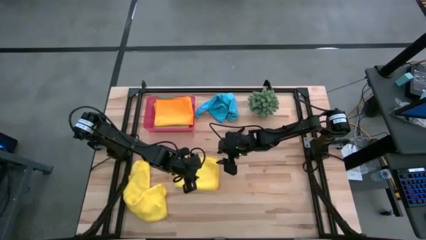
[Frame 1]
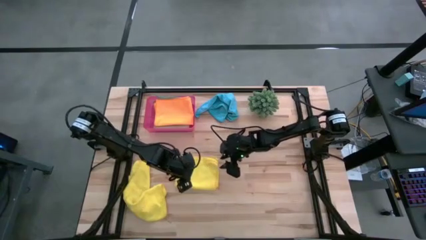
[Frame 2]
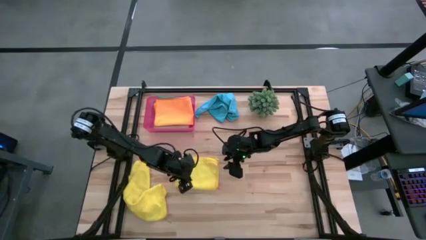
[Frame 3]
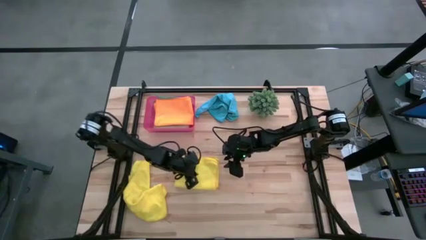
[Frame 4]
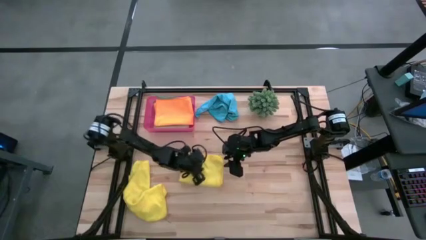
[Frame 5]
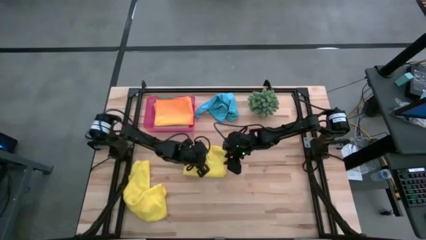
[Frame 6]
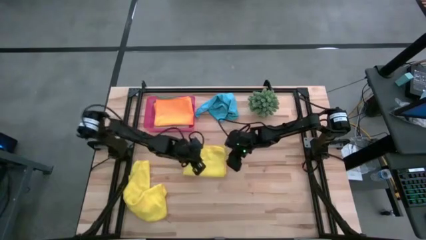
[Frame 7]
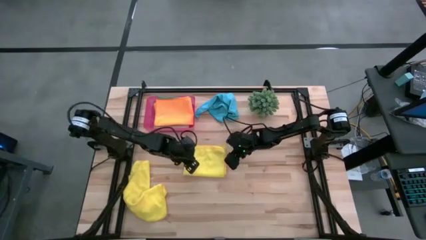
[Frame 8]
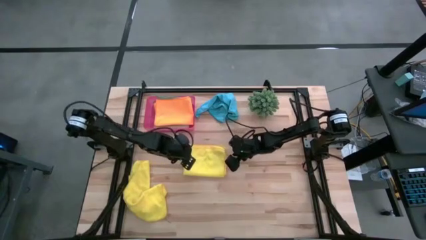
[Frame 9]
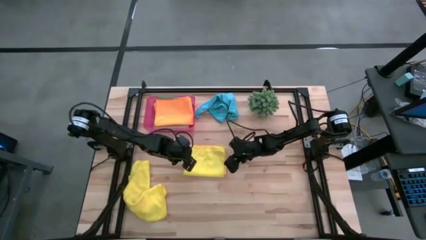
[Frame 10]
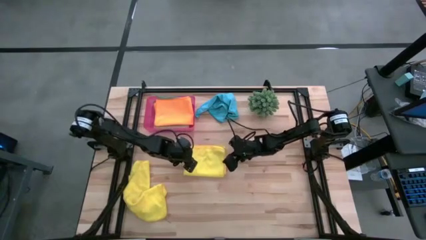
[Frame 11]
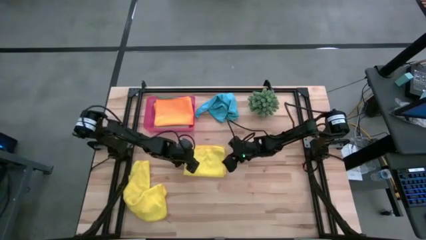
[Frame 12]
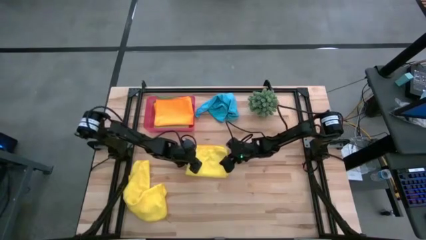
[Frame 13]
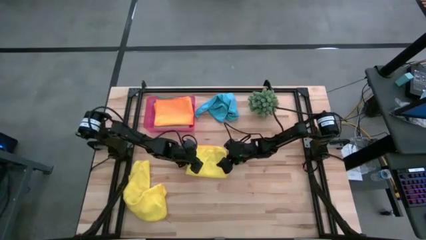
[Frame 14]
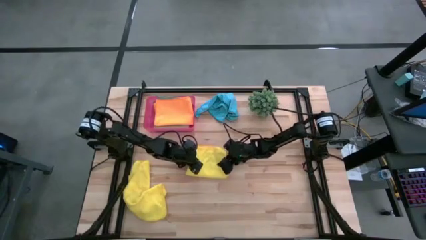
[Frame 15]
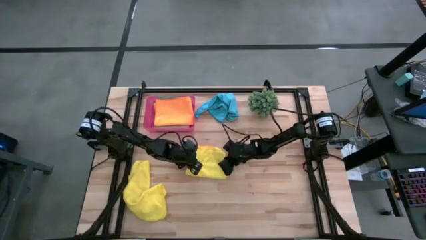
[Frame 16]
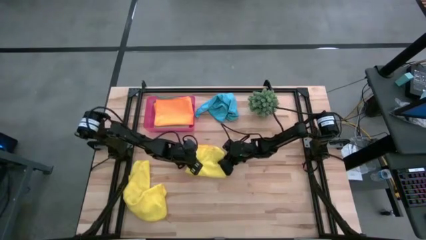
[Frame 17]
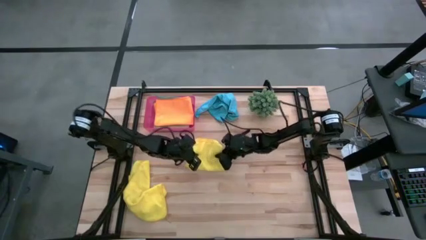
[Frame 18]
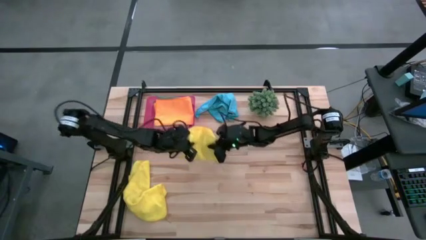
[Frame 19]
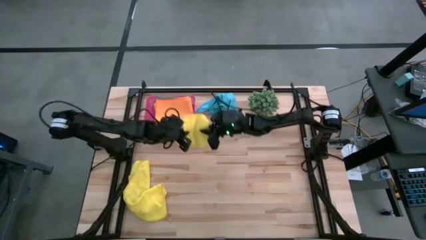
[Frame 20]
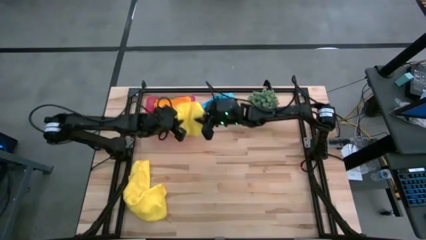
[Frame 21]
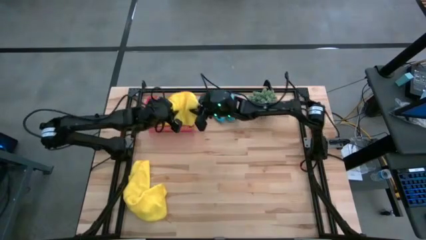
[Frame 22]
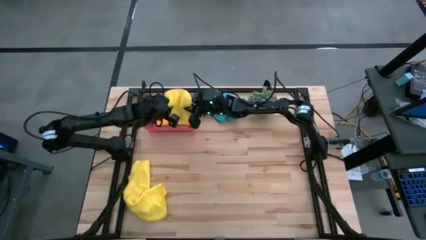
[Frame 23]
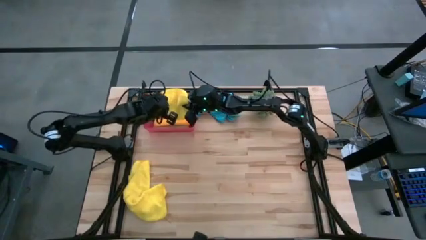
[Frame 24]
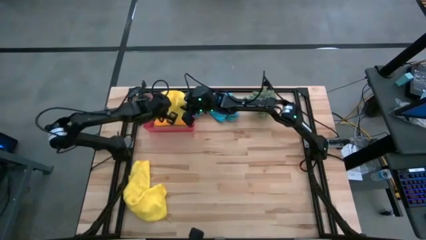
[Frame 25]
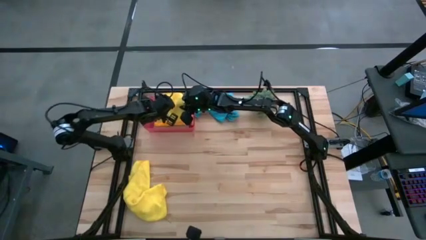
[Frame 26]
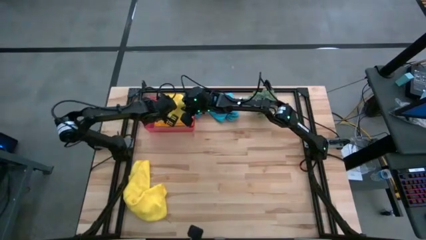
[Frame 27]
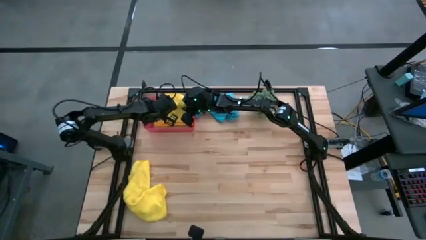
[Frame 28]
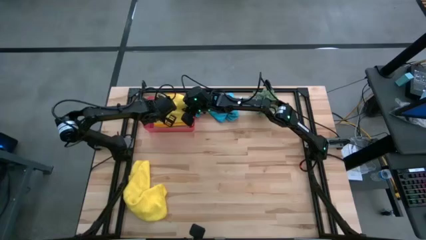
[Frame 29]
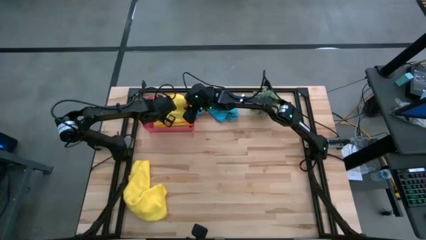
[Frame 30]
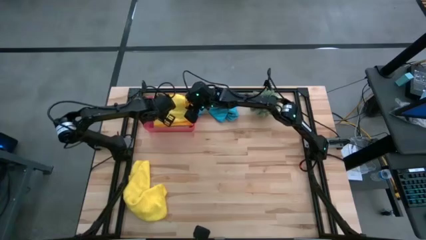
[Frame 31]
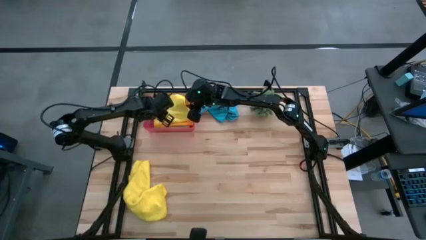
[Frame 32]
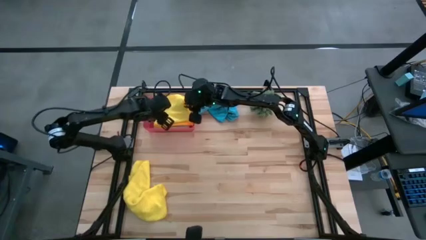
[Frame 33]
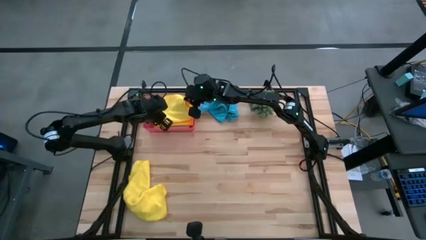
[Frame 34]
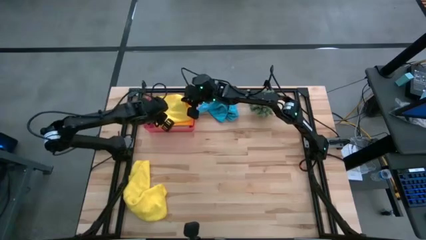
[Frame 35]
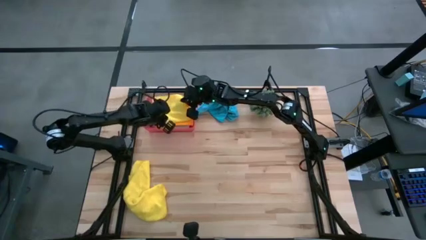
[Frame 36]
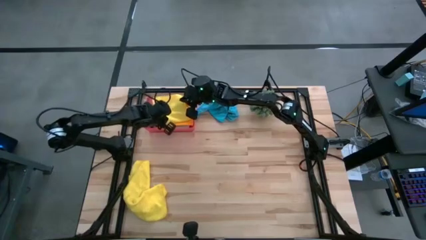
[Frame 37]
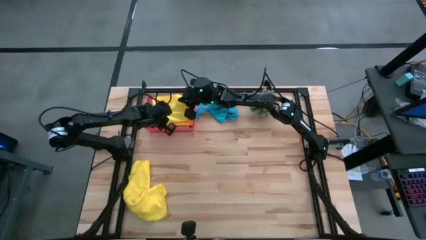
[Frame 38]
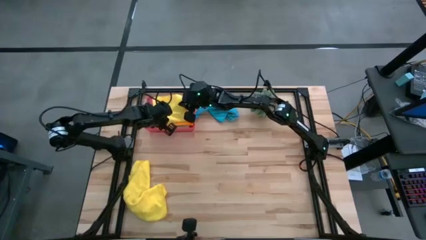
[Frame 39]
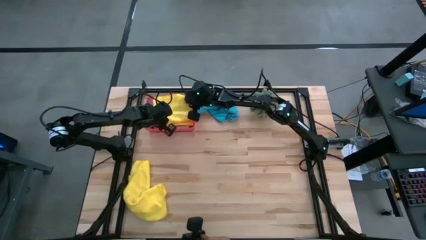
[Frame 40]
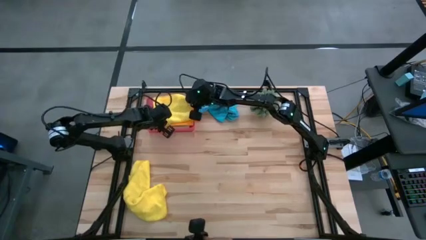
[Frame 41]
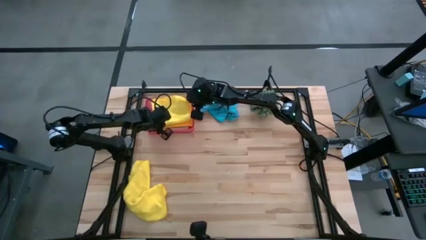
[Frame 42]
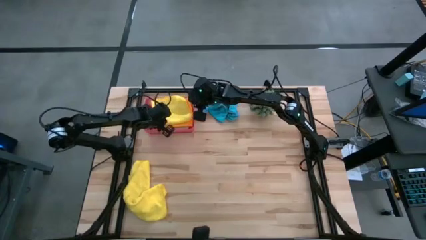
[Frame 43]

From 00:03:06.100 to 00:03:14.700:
Task: Fold microfiber towels
Put the yellow towel into the bin
